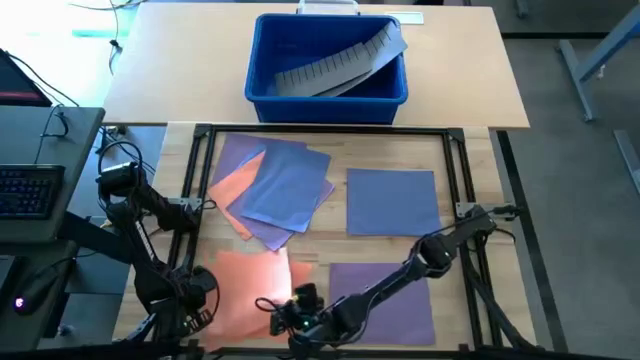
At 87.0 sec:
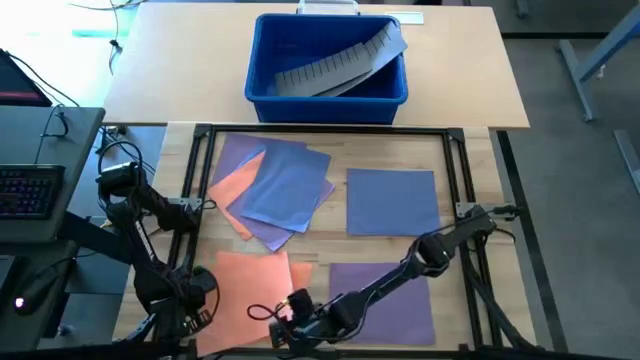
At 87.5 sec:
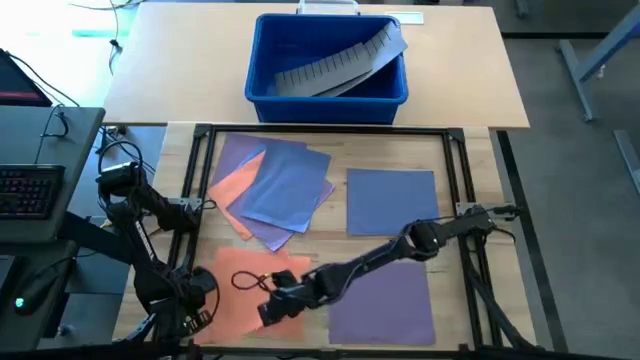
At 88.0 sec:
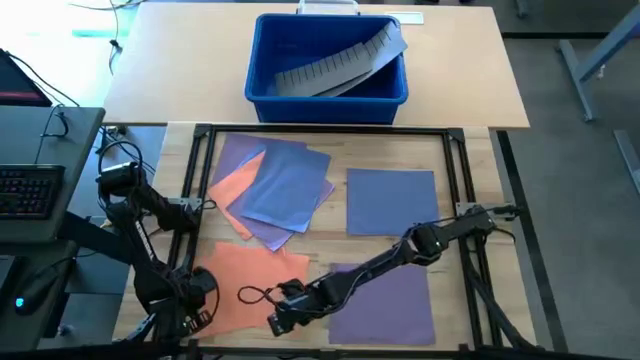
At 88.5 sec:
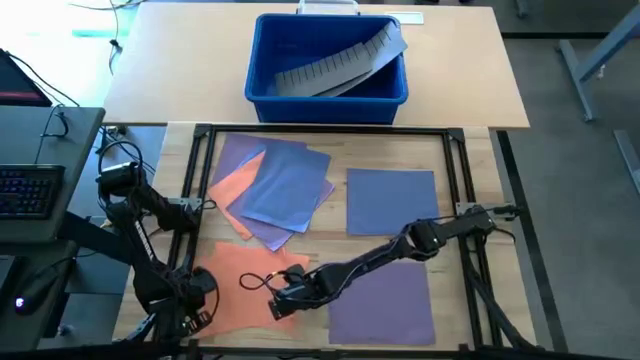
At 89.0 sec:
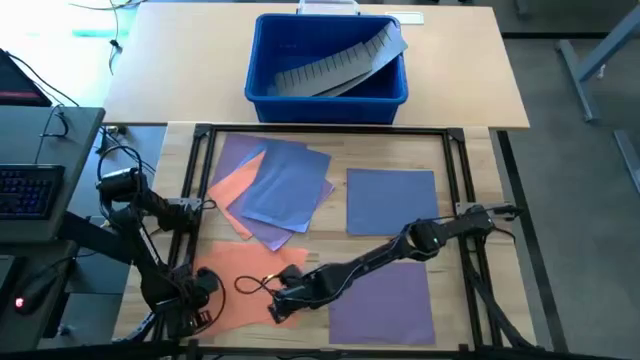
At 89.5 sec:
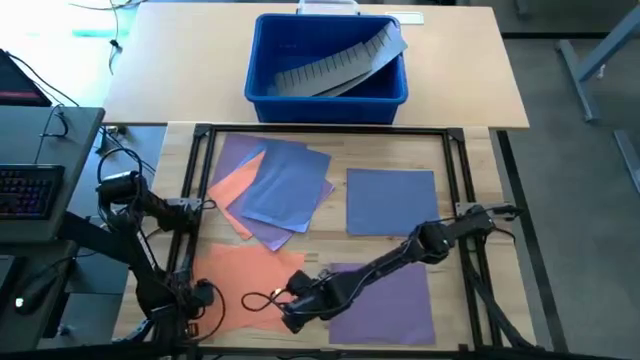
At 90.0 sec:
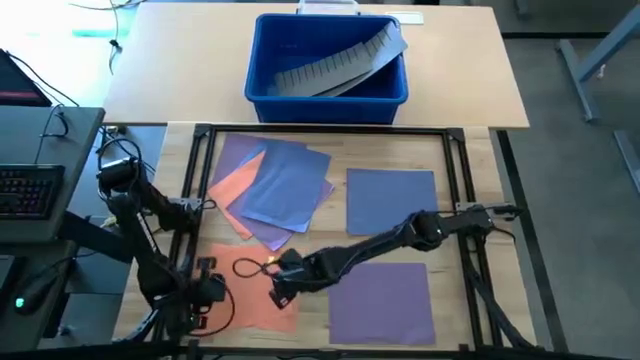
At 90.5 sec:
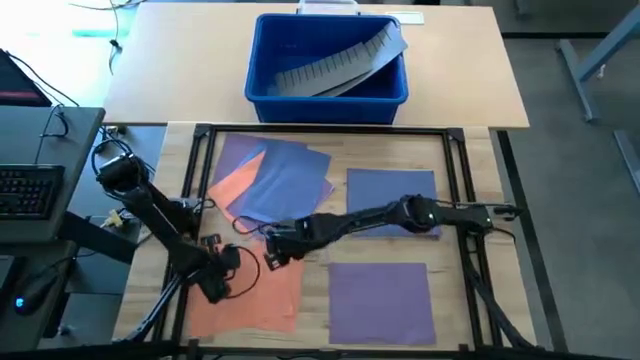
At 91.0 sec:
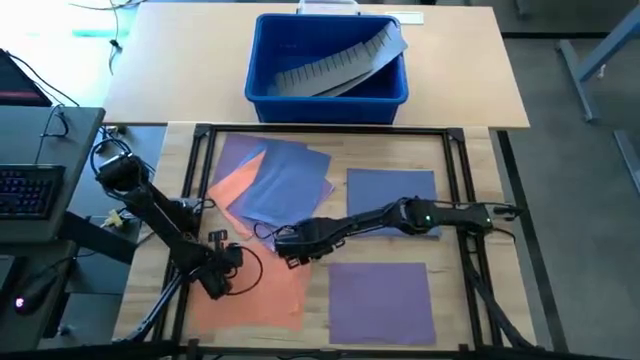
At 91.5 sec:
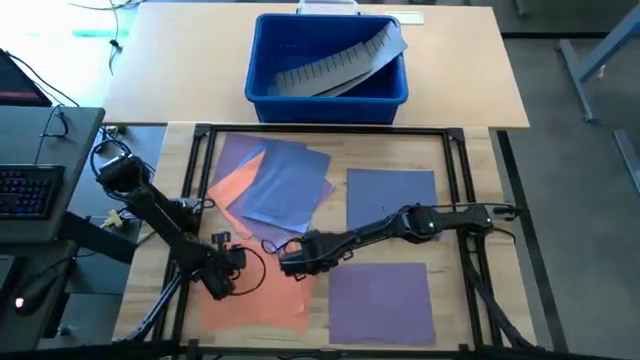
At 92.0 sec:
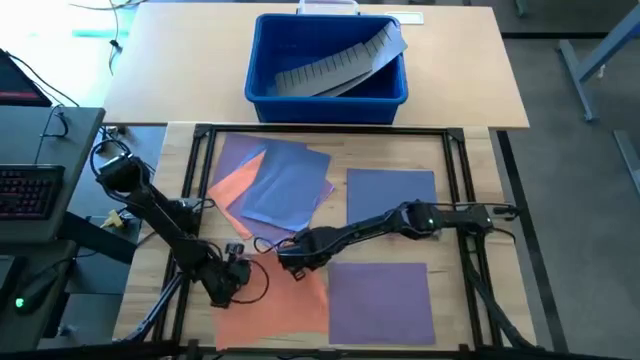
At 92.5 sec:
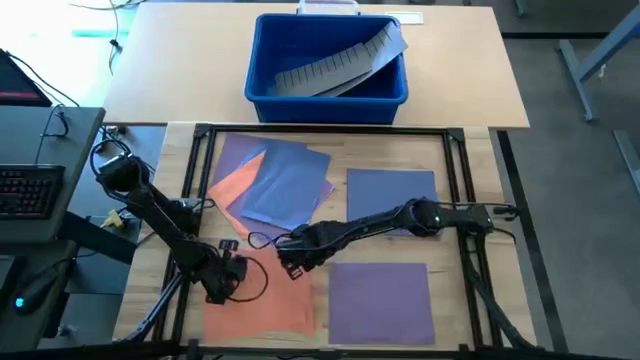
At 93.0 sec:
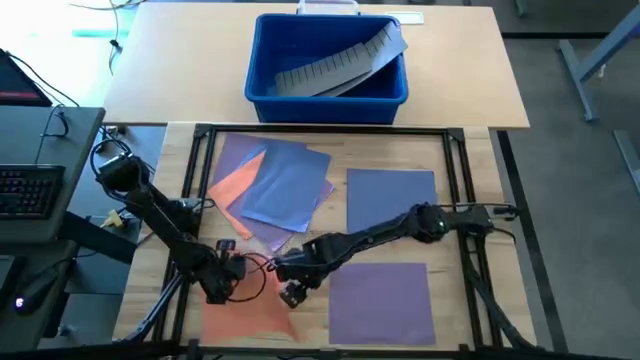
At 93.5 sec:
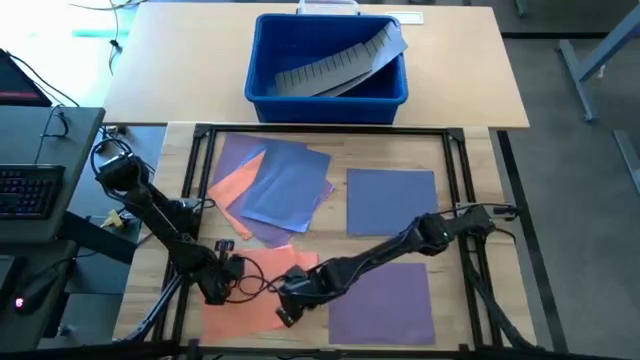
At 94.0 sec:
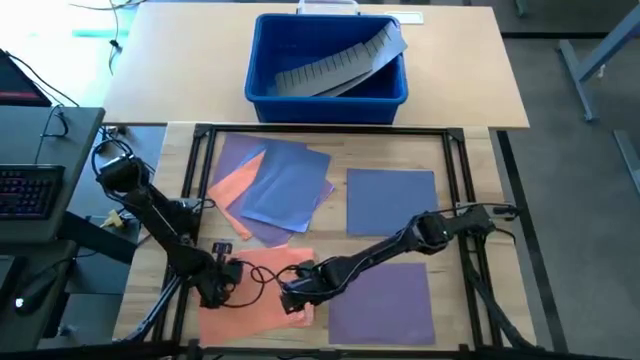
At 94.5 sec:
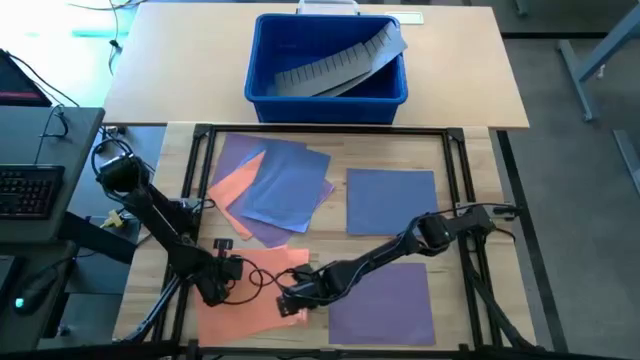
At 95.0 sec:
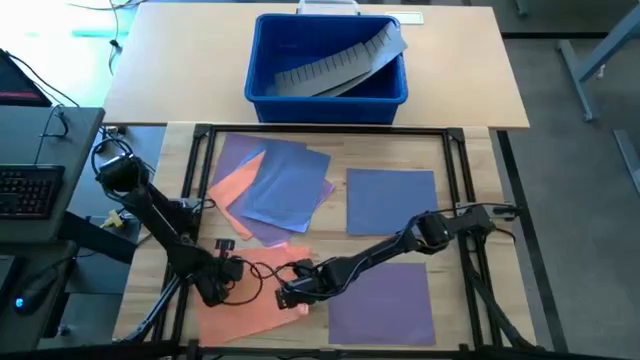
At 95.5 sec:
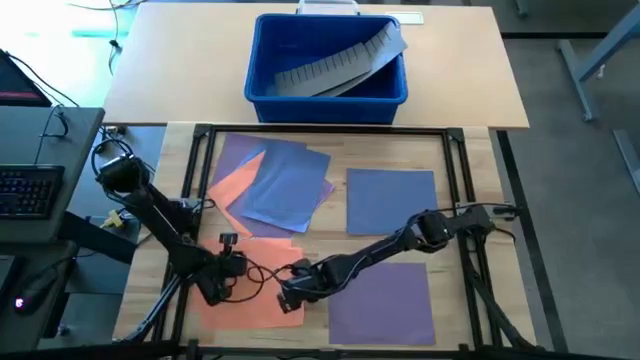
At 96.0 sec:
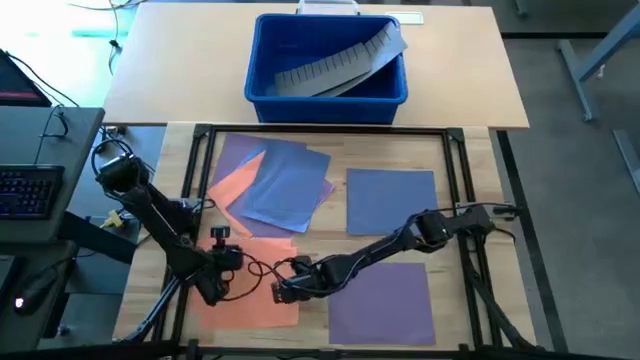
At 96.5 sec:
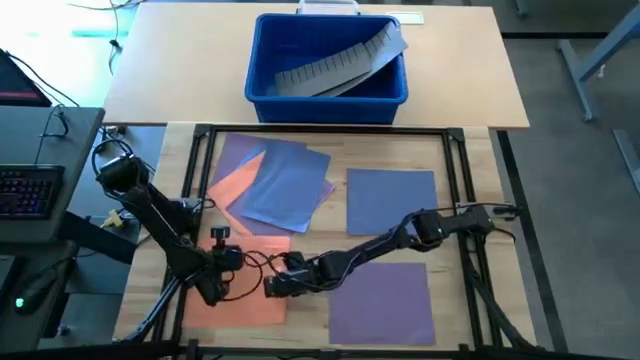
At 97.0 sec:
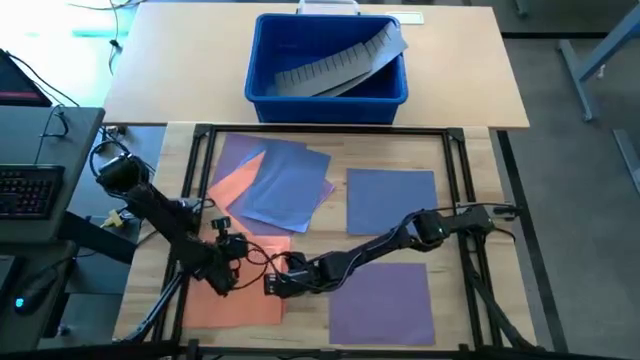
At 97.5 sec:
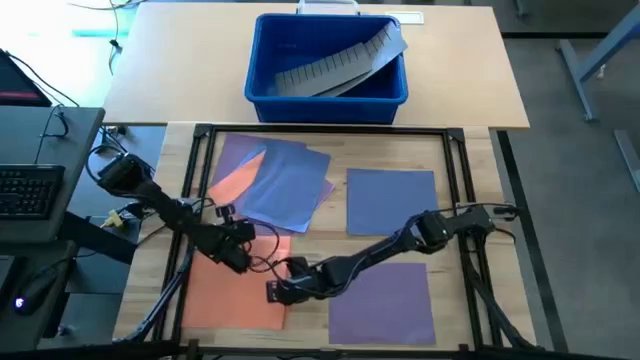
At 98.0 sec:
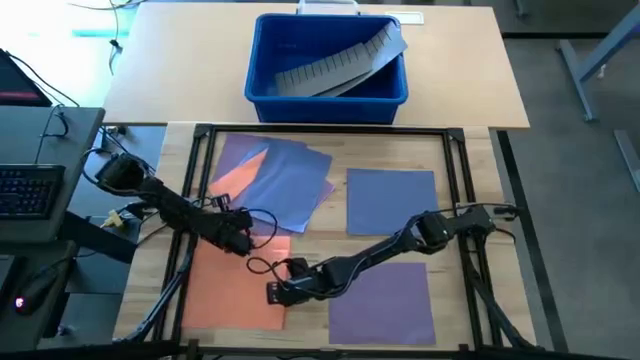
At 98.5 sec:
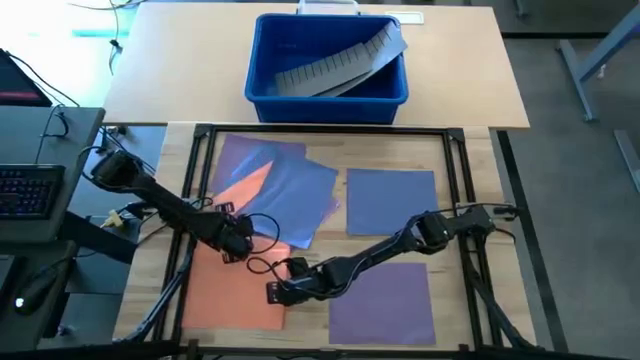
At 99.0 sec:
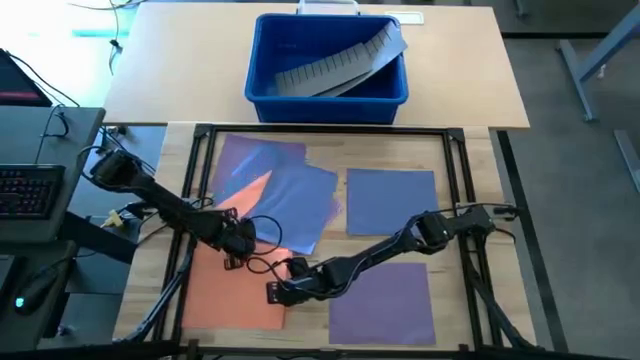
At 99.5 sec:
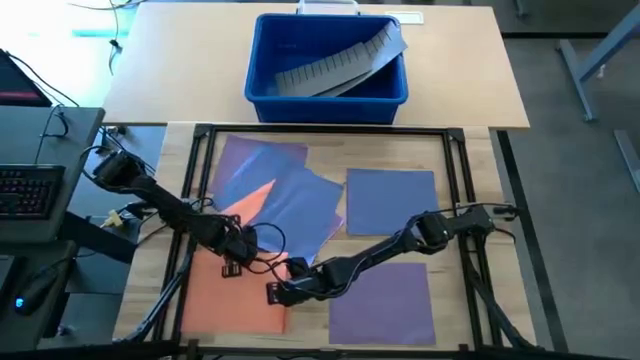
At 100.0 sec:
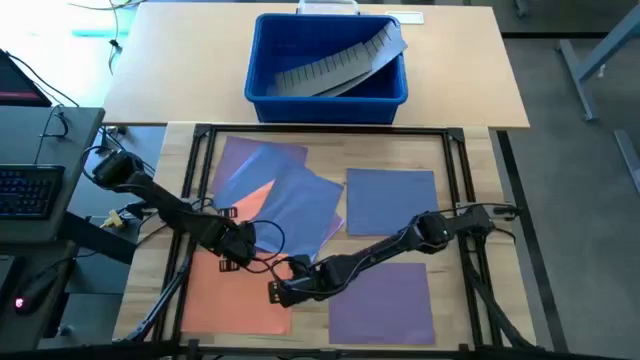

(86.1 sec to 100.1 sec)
Task: Organize paper
Stack the orange paper on top of the orange paper

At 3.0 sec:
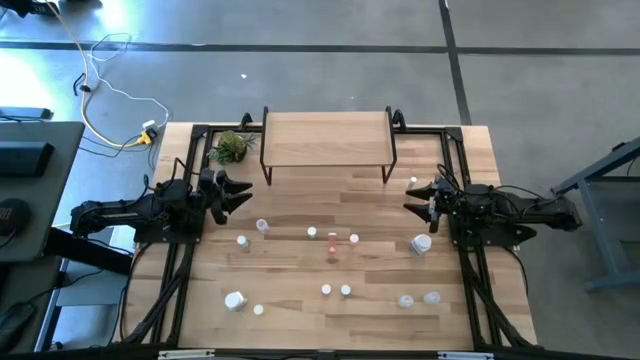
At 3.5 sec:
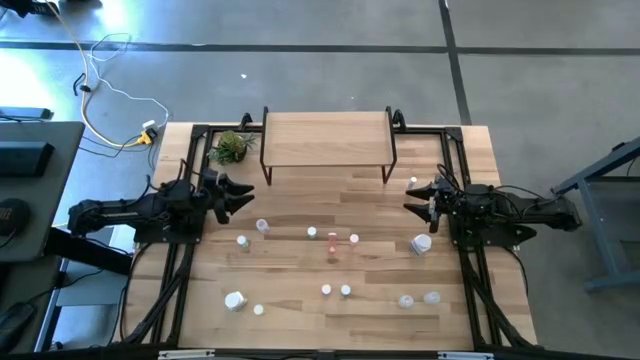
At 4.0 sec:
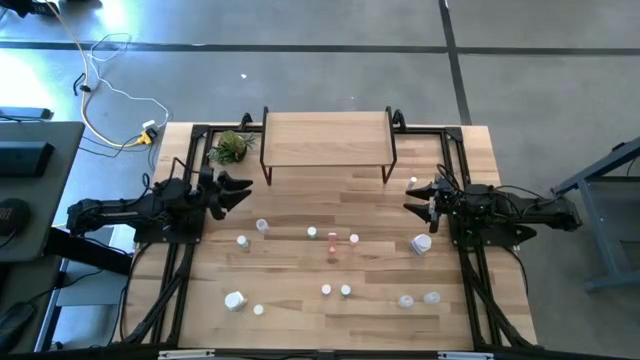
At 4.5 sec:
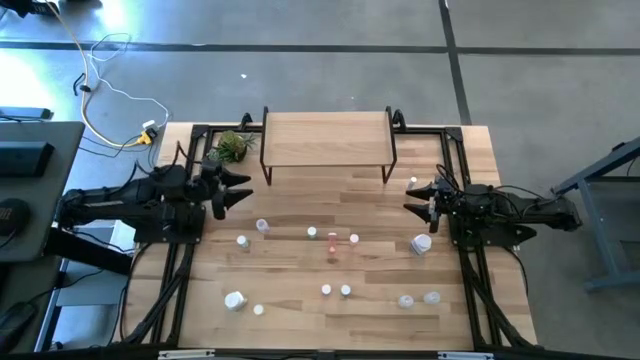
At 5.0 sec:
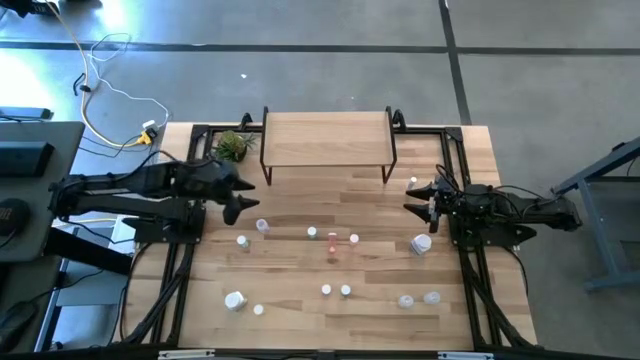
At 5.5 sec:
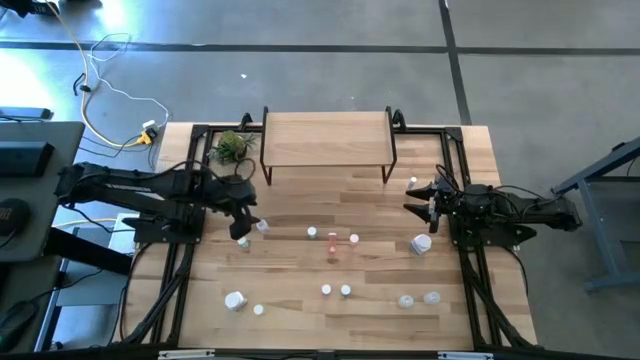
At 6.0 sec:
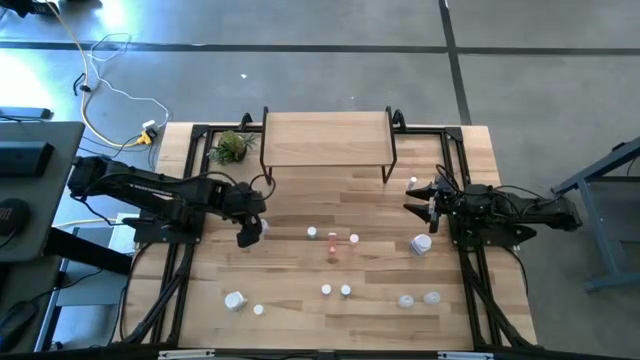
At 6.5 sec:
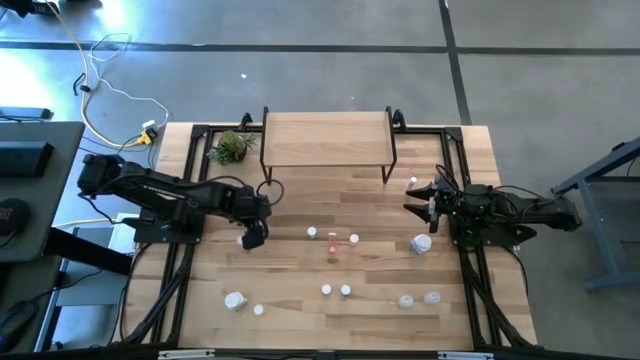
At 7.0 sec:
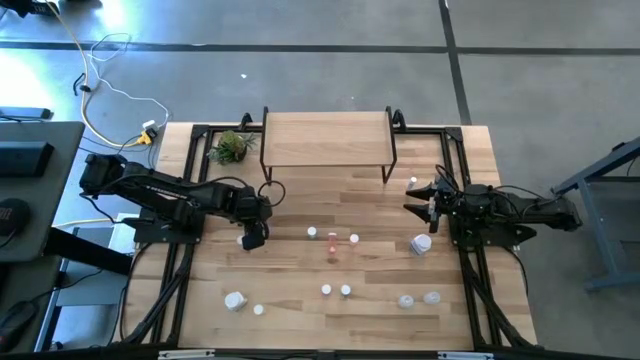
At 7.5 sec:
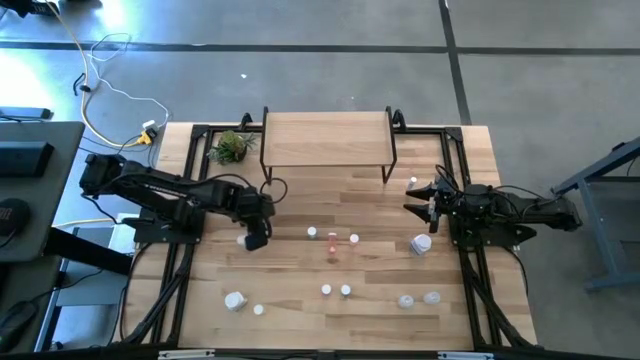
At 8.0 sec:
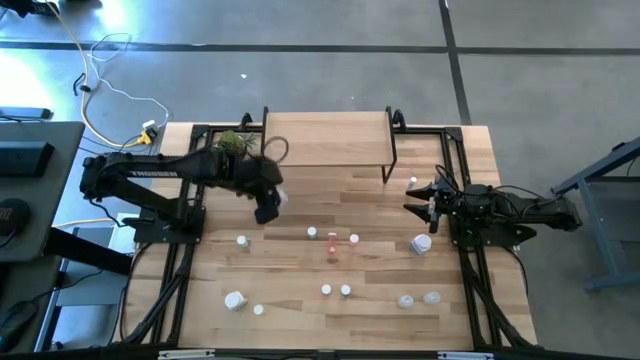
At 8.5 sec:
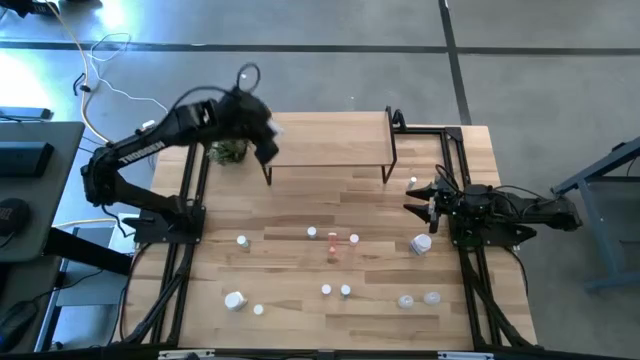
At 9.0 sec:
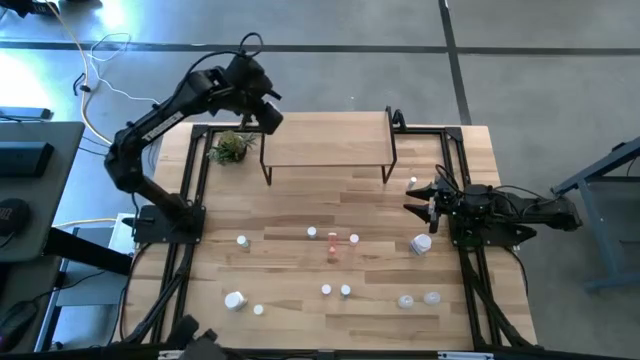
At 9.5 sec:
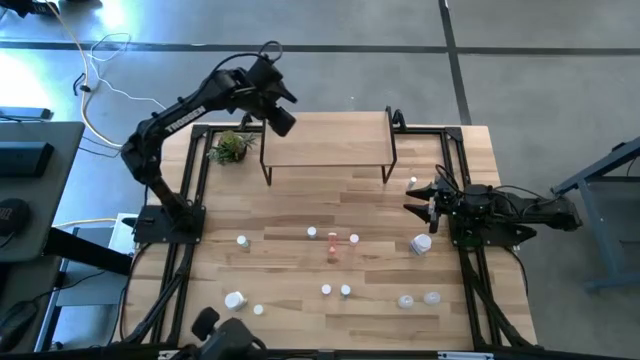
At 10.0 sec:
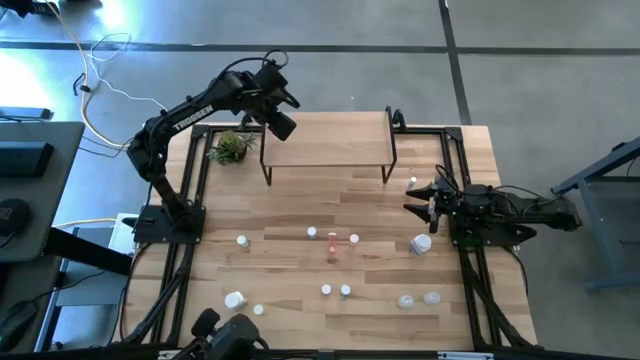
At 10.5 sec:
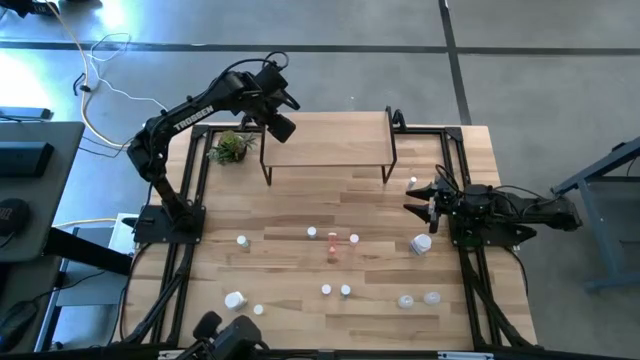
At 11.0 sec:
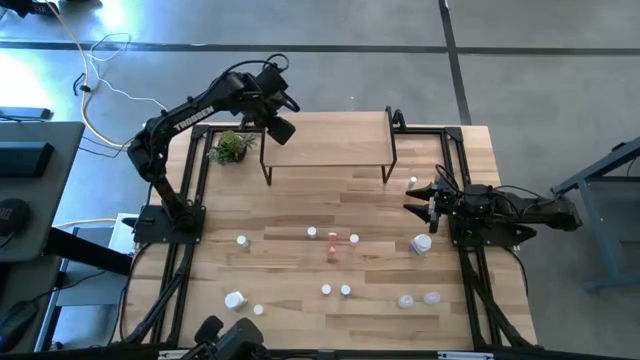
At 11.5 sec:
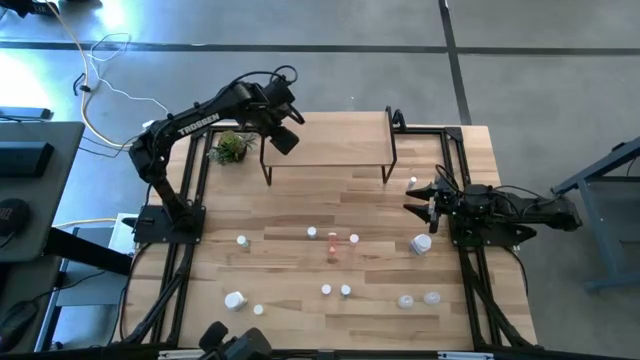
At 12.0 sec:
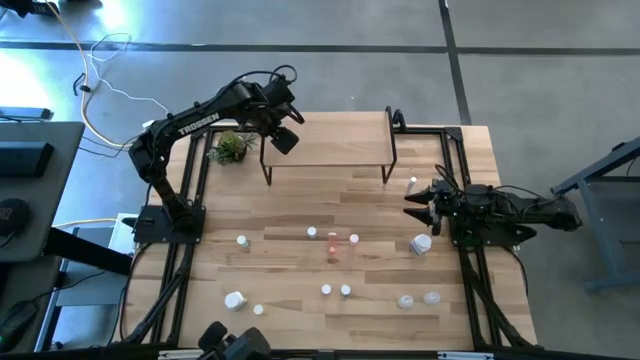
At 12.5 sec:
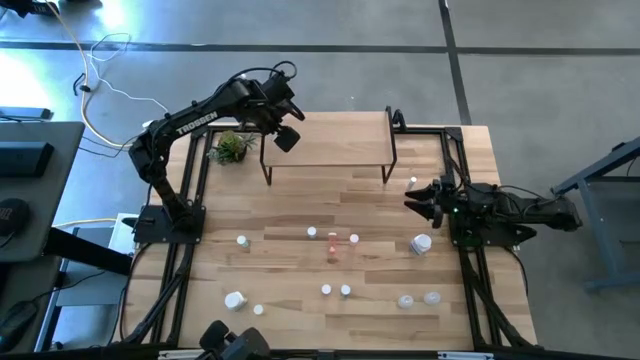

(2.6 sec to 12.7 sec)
Task: Pick and place medicine bottles onto shelf by color
Put the transparent pill bottle on the shelf
